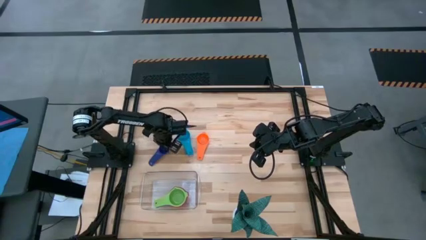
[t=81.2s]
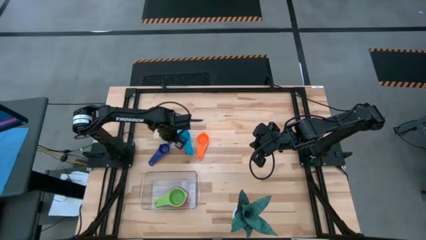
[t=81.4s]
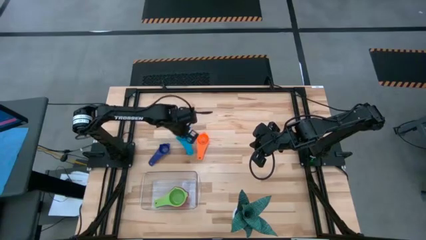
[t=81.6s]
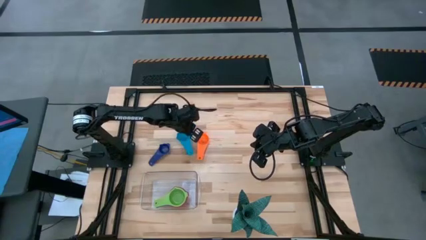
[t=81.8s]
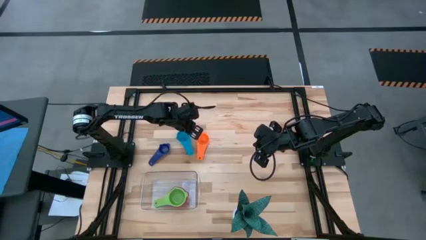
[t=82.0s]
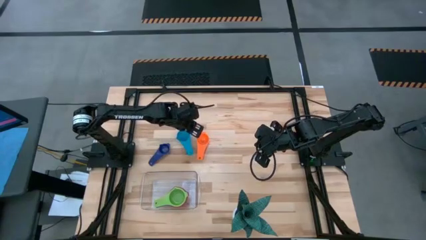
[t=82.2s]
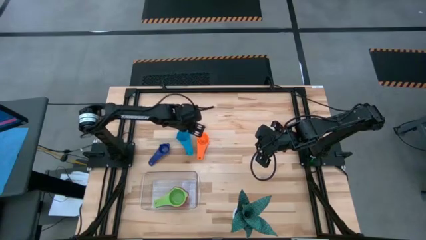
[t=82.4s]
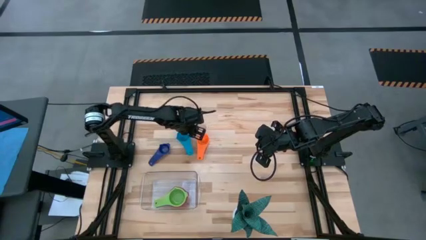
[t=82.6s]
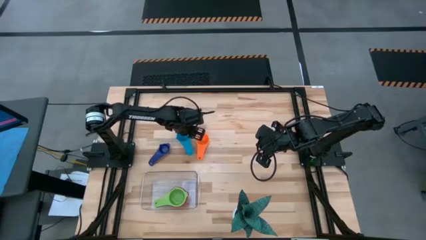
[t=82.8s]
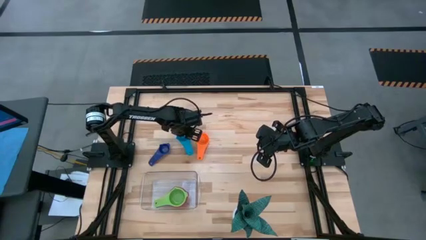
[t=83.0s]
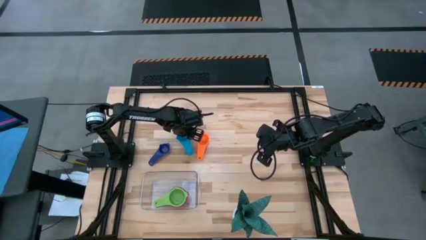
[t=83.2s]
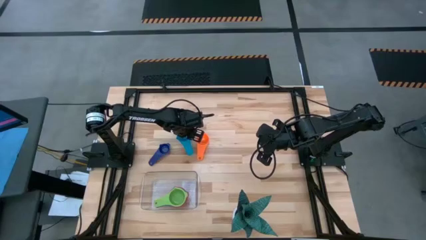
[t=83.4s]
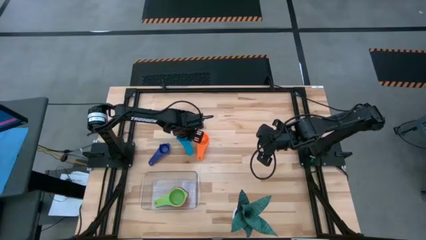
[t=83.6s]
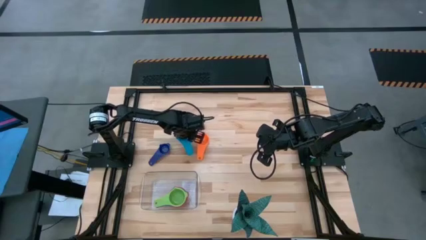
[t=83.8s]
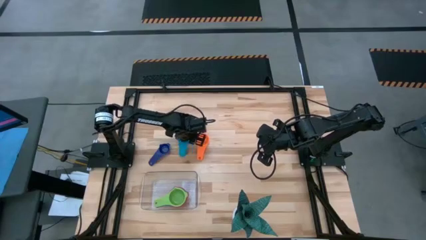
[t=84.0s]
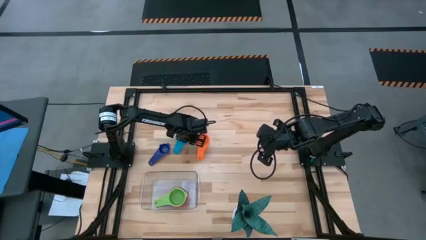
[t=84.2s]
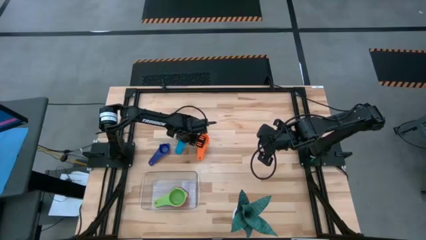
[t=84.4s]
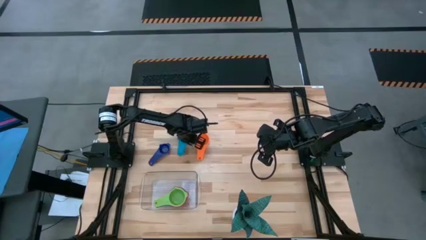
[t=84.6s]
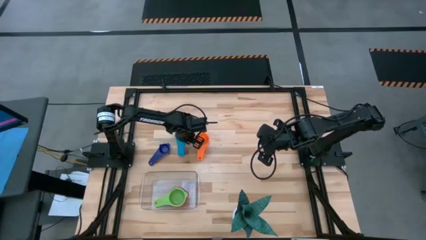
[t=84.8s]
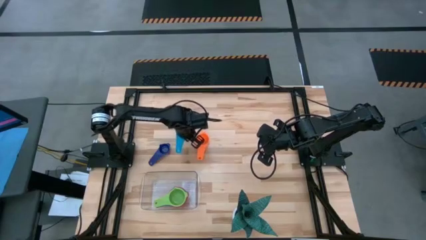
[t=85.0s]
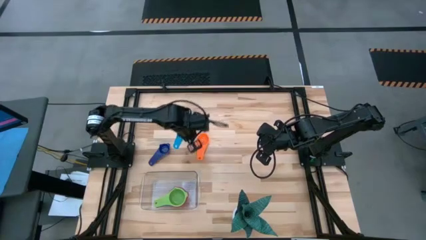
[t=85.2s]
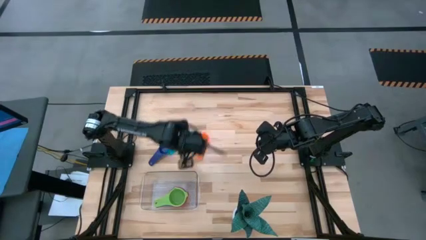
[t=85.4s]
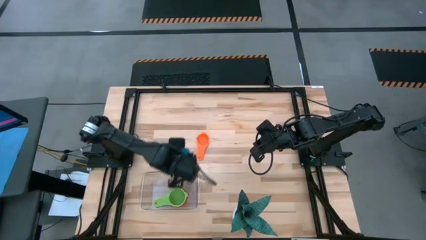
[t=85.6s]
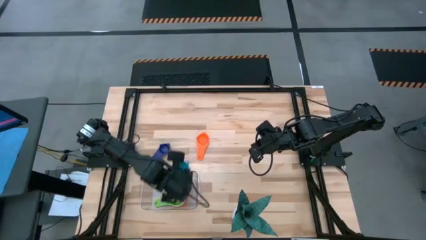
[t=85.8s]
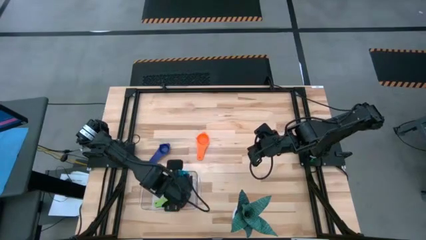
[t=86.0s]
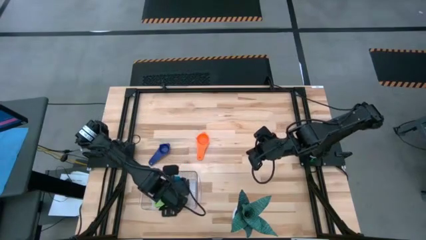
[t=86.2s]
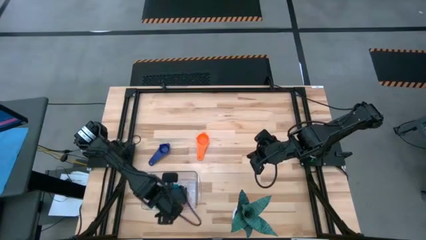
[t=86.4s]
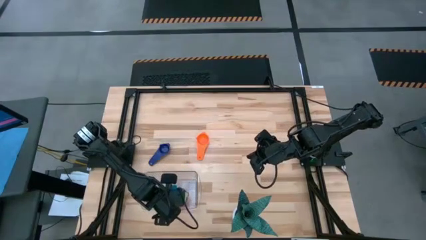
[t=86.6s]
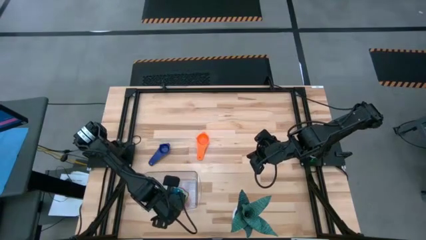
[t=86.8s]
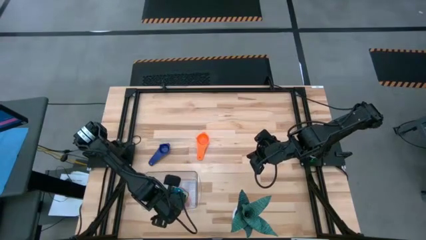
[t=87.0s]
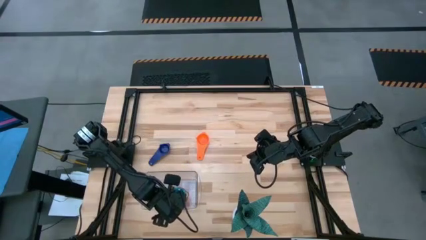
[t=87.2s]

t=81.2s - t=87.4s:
Task: Nest measuring cups in basket
Stack the light blue measuring cup on top of the green measuring cup in the transparent bin

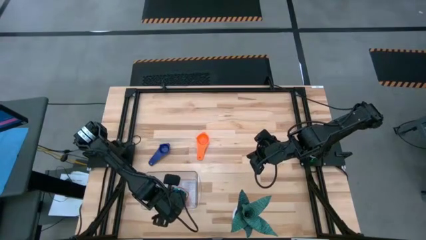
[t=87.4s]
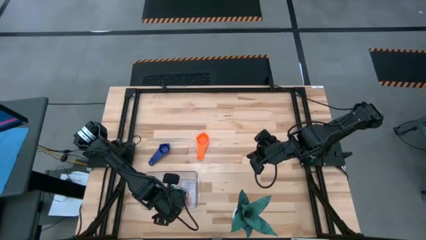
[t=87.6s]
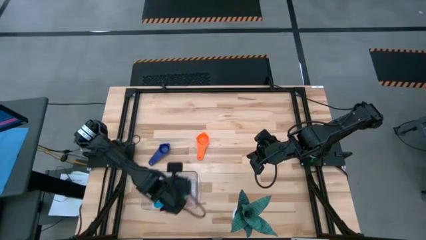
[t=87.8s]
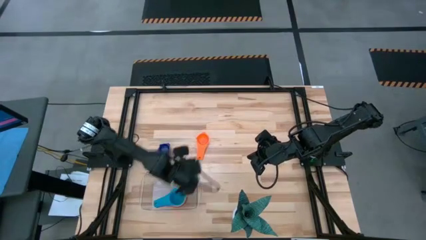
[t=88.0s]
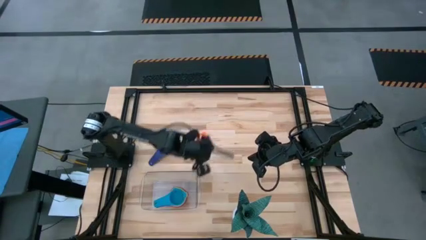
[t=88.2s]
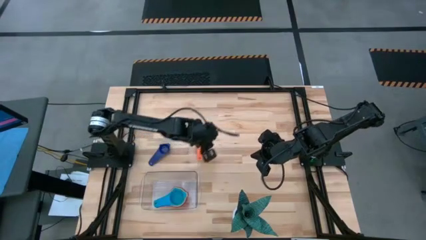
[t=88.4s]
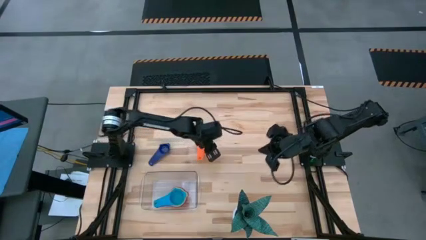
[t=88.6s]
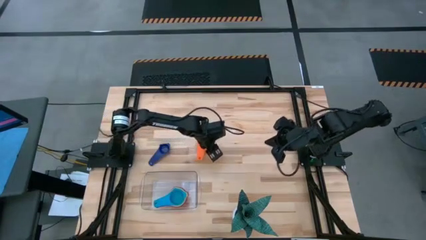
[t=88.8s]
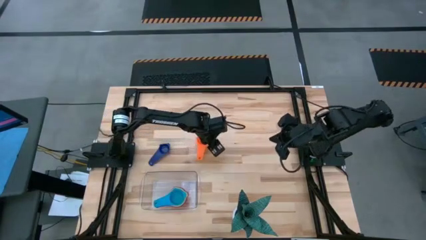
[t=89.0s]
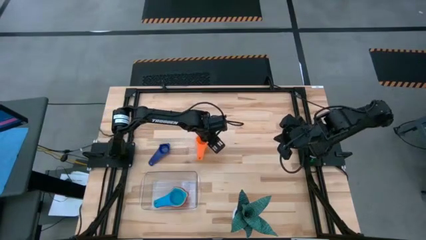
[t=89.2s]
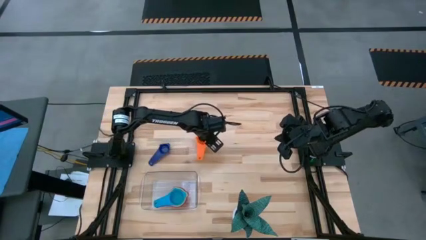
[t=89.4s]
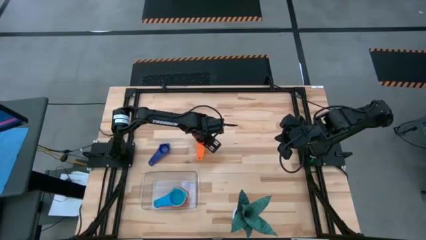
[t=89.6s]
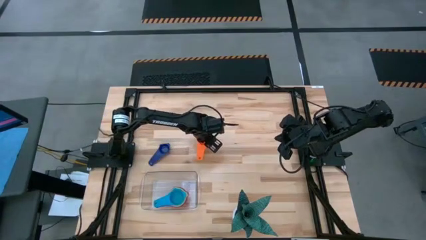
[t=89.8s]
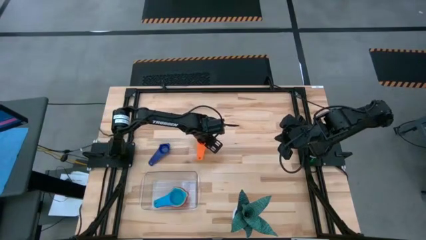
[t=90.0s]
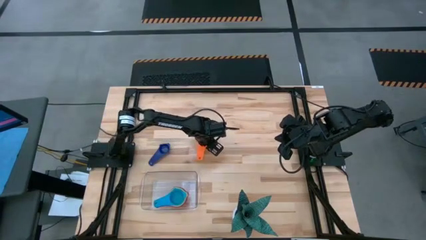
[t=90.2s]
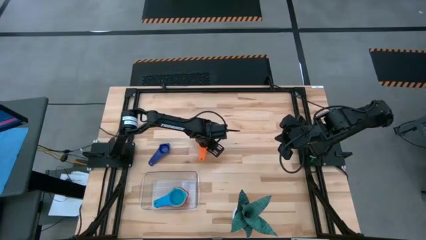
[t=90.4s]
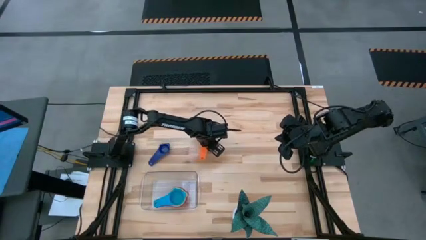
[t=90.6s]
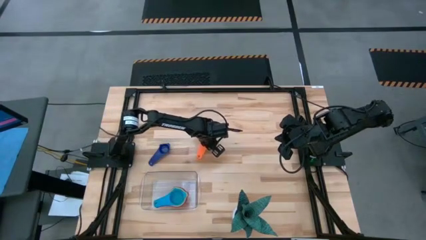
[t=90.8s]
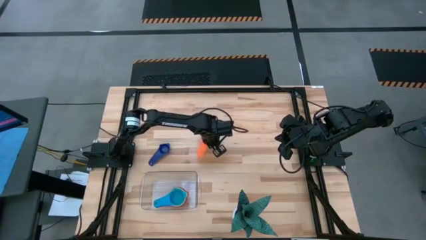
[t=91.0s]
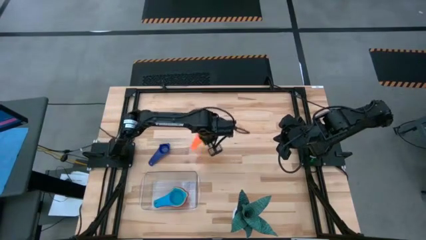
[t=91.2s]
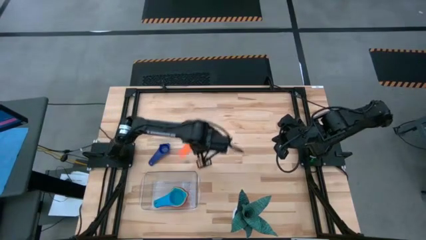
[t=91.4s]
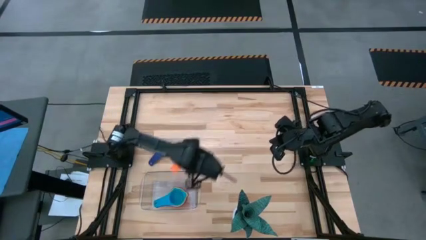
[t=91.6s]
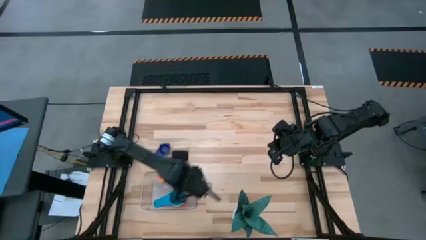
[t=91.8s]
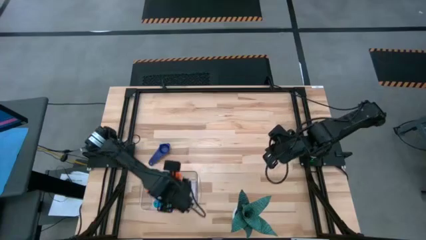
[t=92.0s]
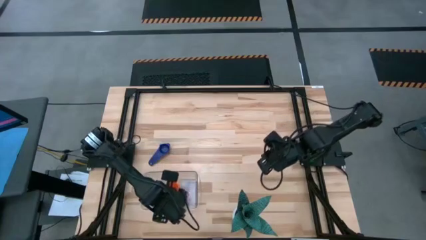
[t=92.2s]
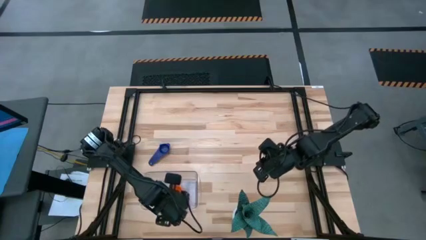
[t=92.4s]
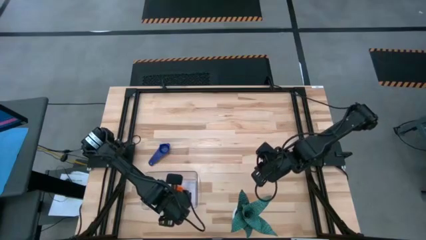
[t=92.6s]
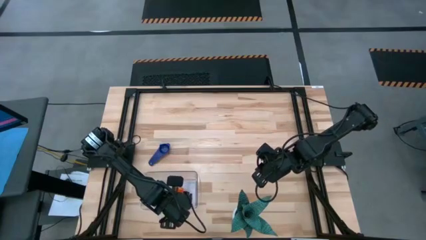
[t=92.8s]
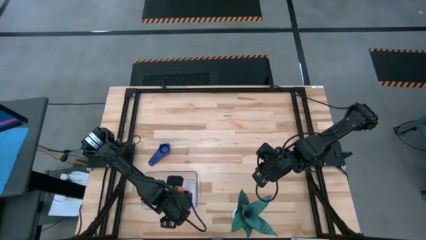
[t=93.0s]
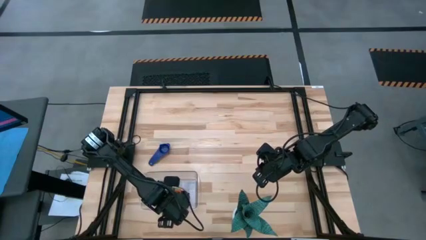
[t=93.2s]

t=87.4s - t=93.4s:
Stack the orange measuring cup on top of the light blue measuring cup in the transparent bin

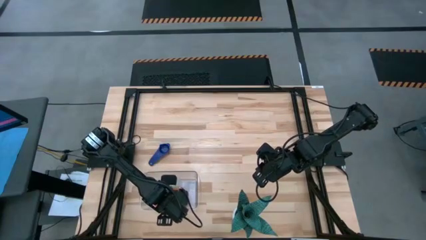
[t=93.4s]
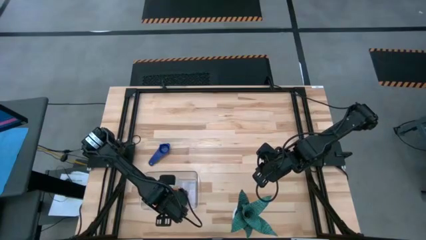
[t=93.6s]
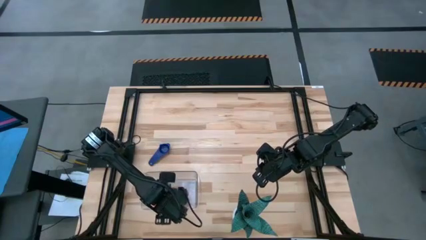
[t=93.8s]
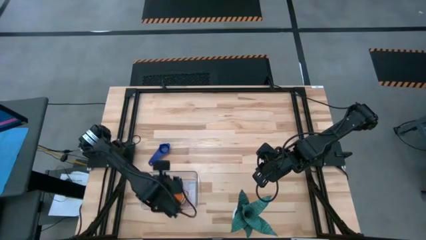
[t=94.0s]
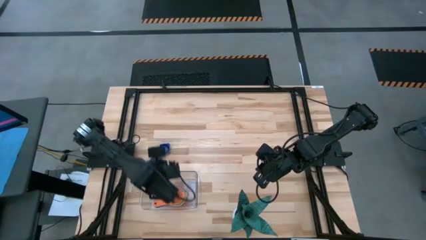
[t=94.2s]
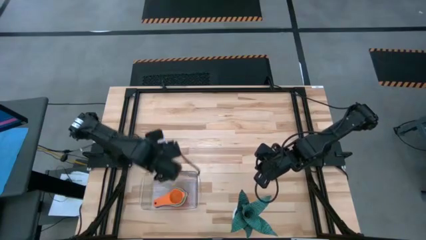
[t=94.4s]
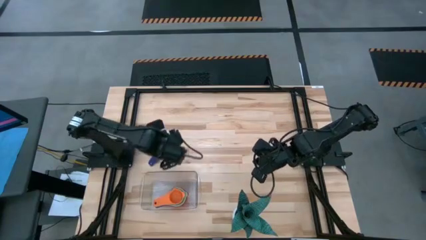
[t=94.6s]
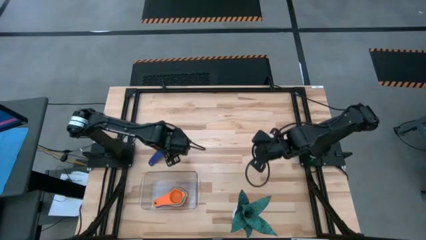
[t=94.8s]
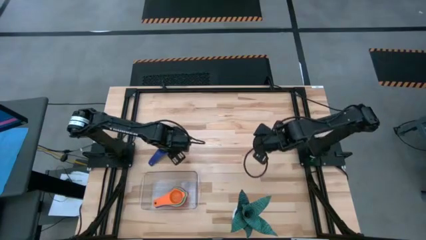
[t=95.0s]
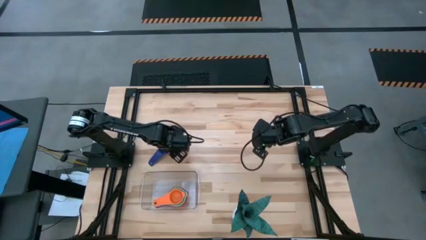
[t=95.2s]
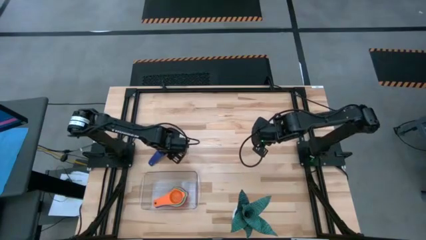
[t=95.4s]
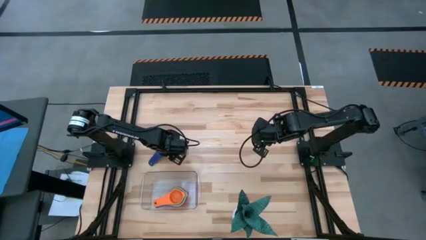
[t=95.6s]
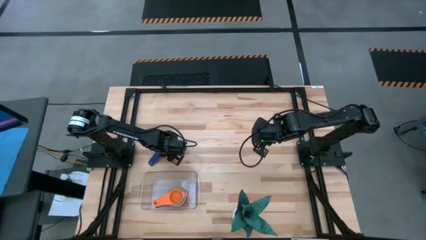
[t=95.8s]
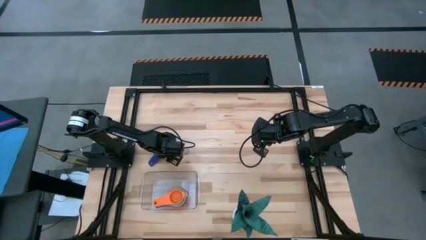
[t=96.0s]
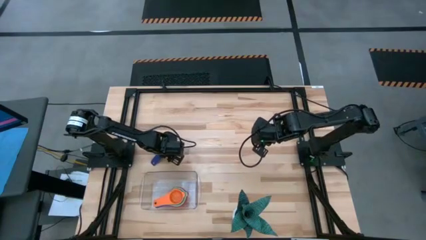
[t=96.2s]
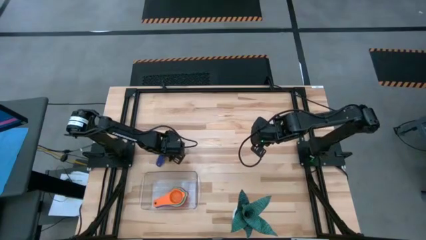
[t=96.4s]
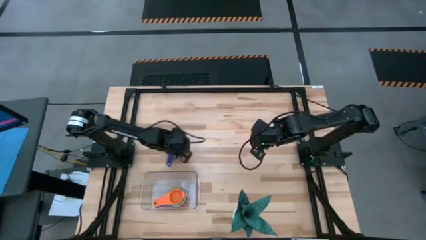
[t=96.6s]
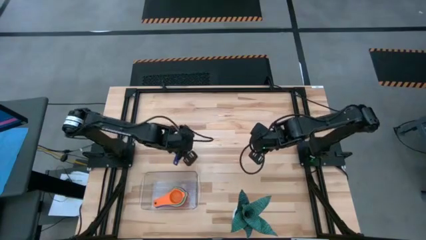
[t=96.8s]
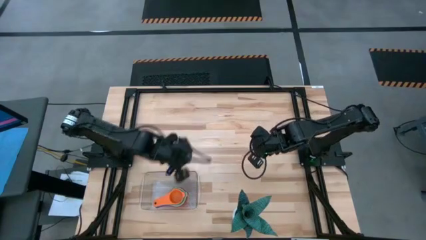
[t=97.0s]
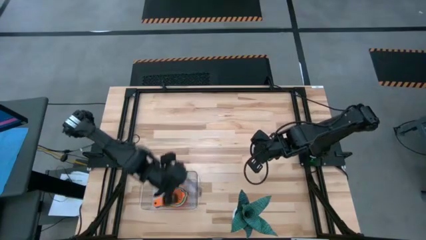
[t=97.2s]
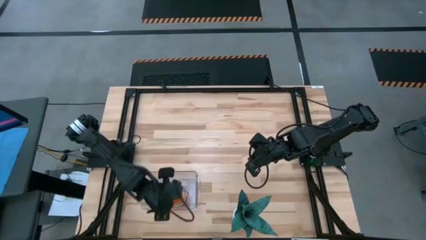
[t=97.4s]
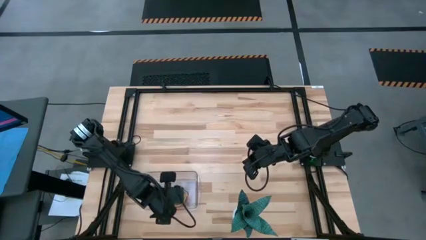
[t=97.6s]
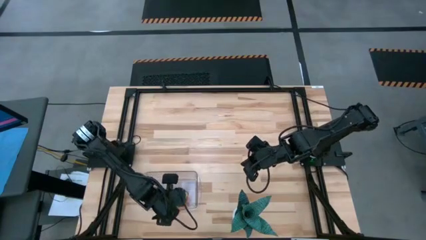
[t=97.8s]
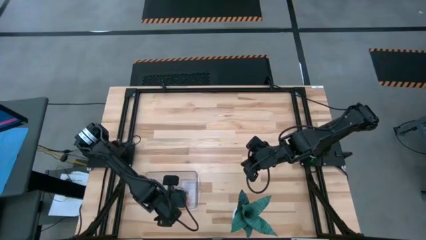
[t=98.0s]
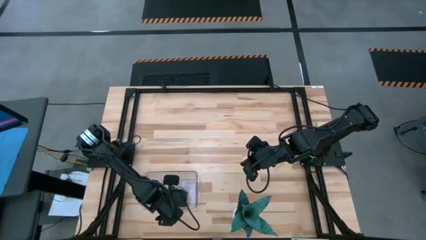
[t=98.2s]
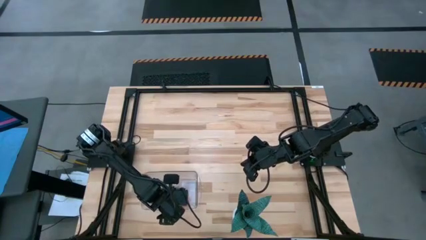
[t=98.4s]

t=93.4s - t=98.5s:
Stack the dark blue measuring cup on top of the orange measuring cup in the transparent bin
